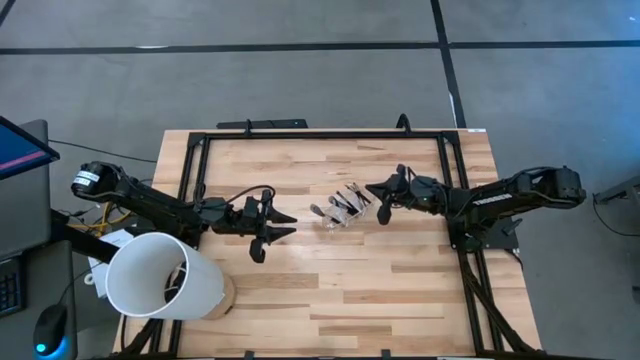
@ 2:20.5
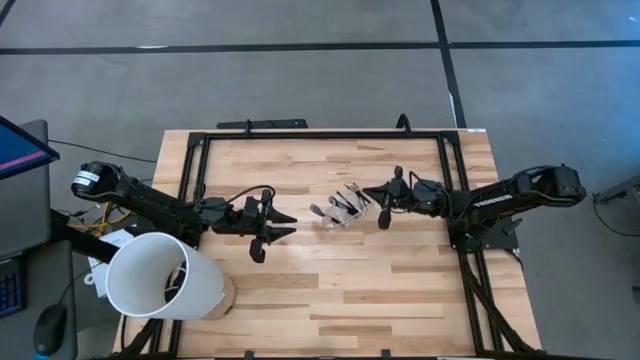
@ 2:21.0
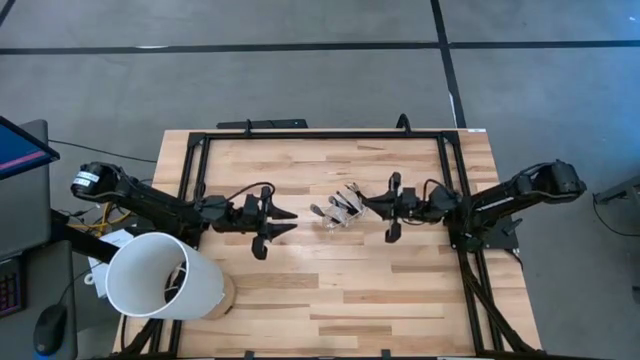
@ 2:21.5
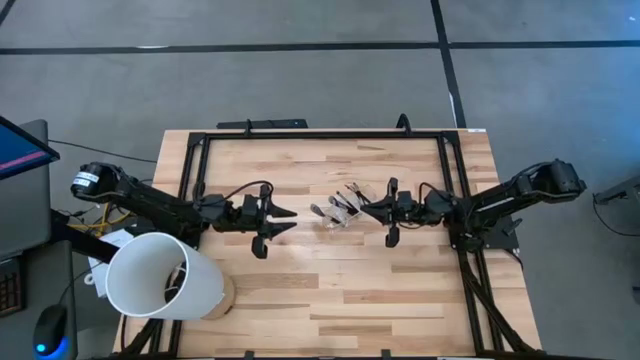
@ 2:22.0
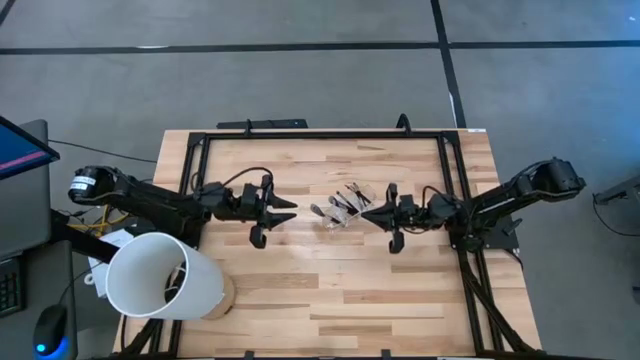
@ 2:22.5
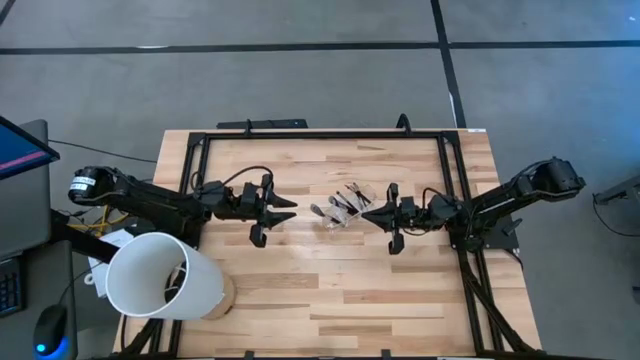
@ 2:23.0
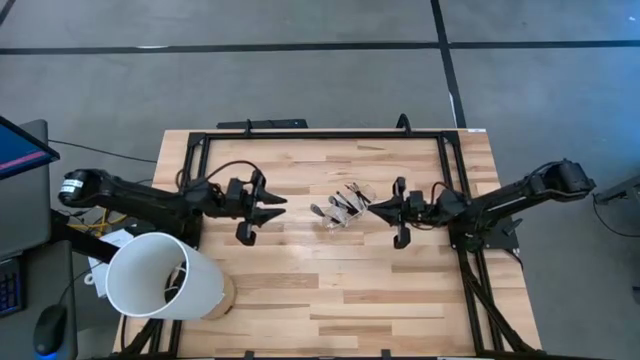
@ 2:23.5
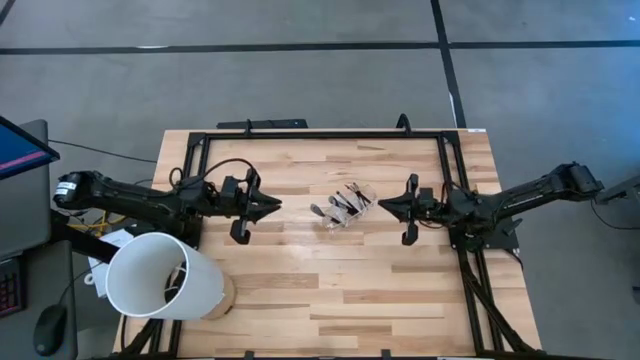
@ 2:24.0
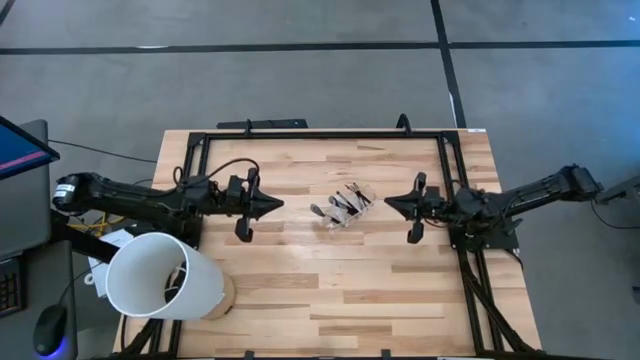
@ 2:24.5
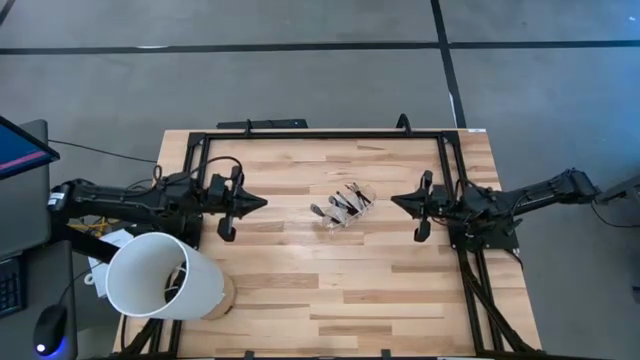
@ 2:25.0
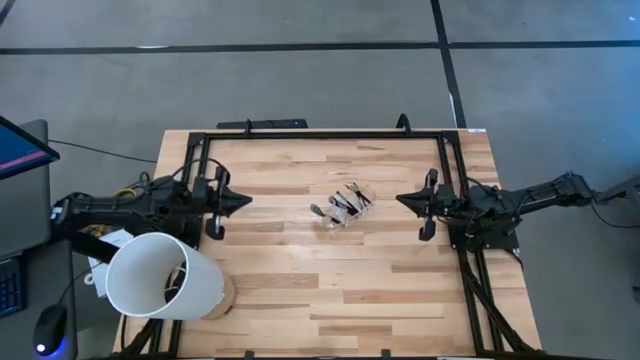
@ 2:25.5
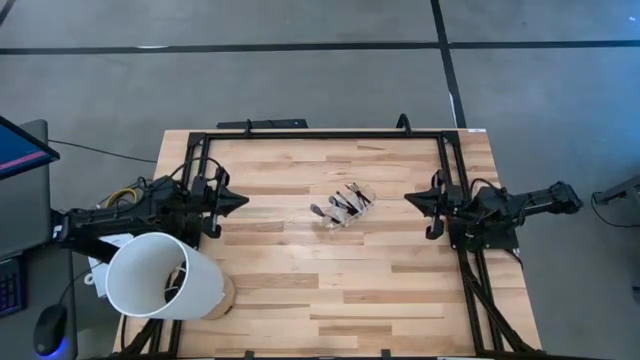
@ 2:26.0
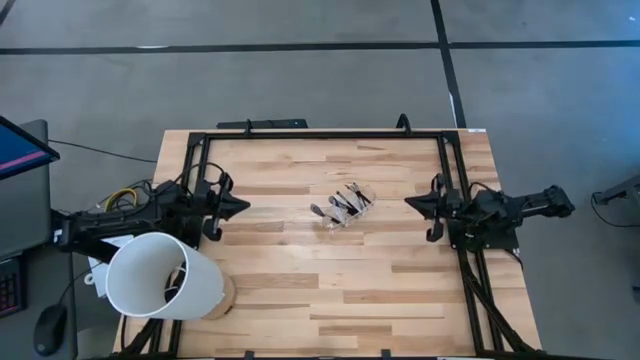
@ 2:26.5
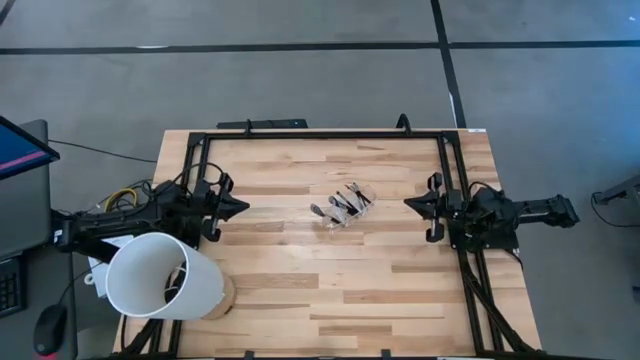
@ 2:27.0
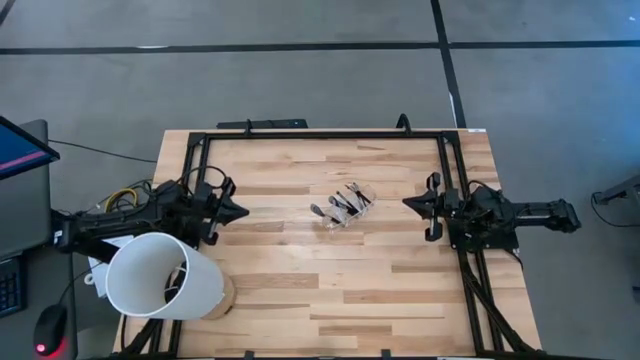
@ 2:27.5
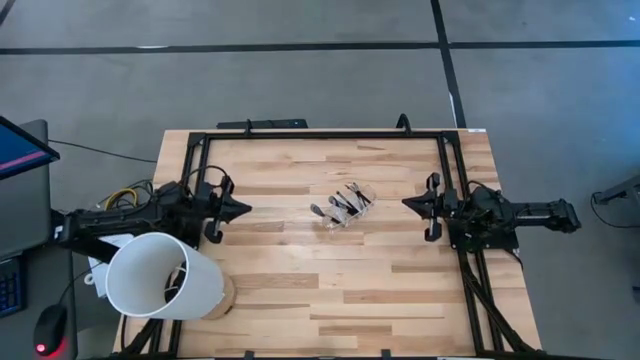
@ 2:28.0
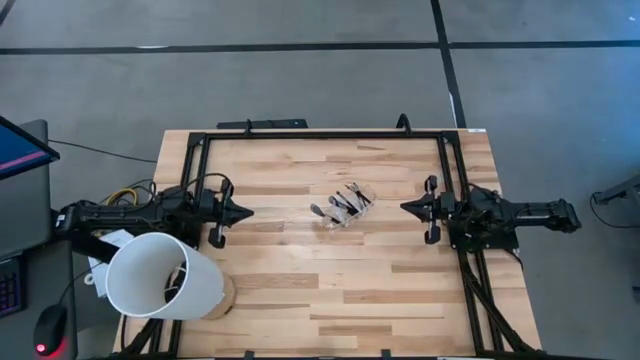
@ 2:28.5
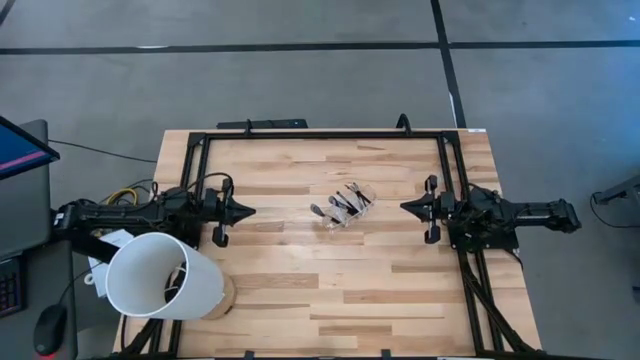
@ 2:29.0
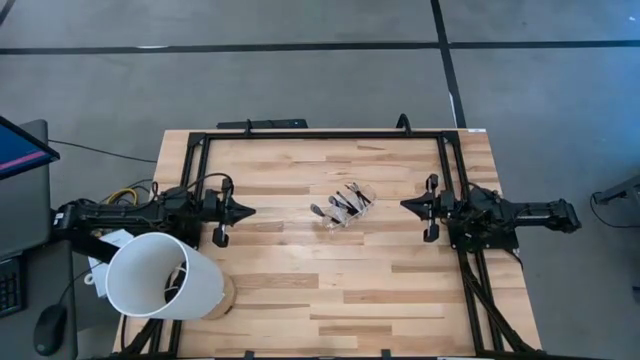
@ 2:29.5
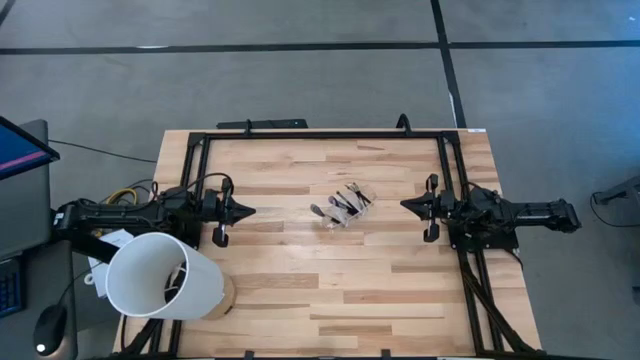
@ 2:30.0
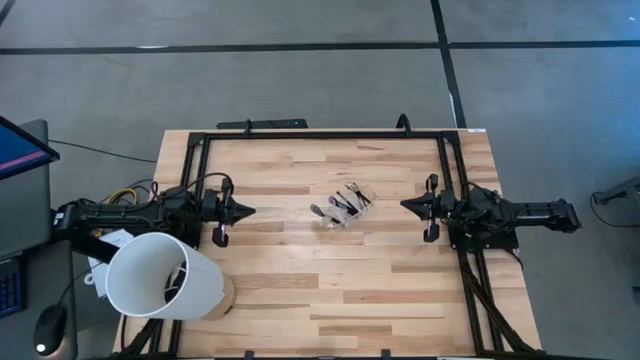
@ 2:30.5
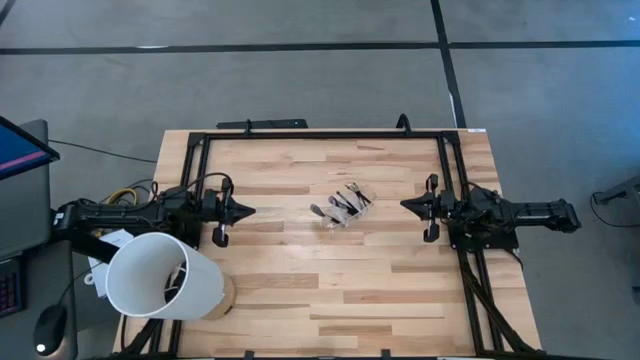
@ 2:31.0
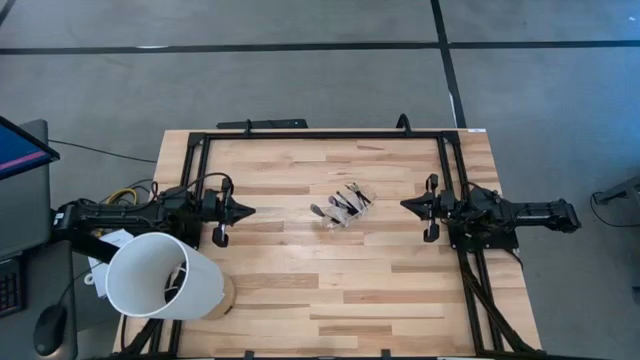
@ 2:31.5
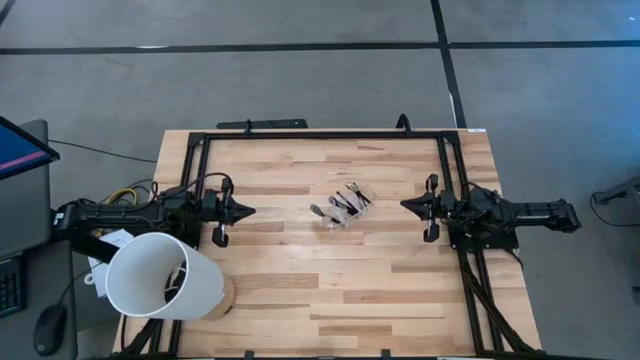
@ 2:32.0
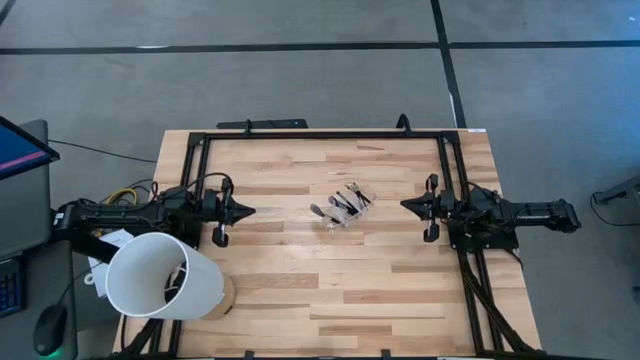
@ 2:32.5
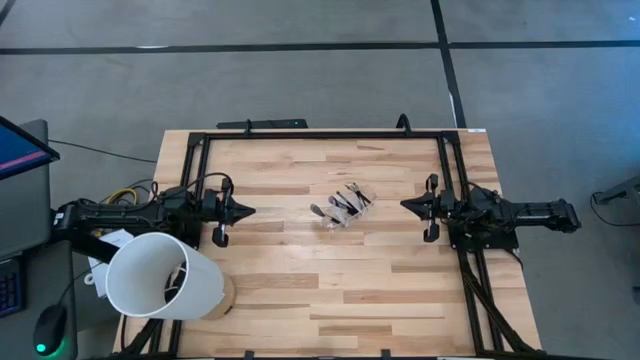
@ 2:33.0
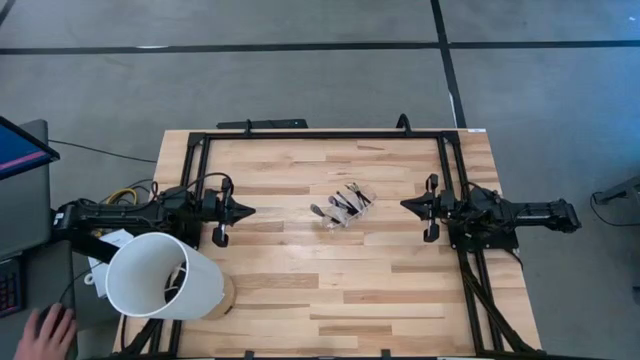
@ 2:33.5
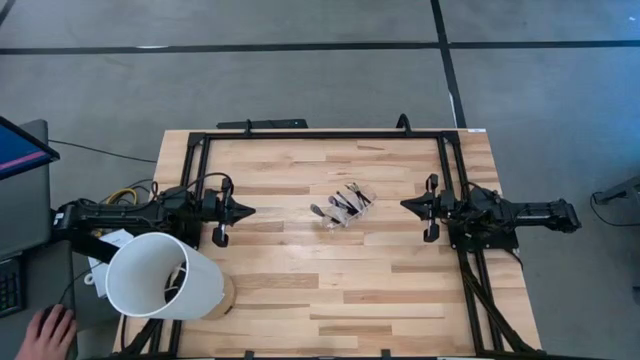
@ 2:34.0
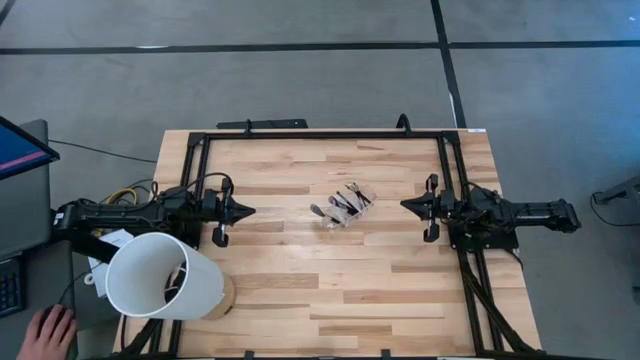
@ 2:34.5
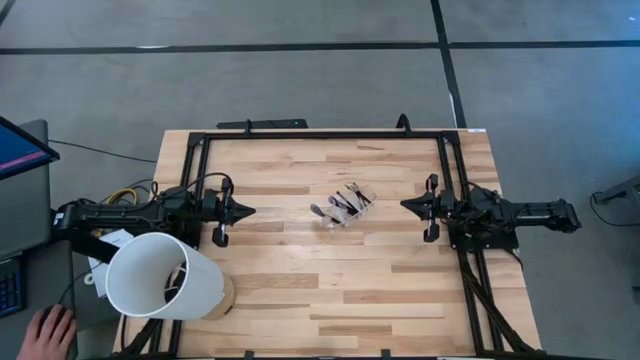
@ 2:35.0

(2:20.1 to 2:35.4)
Task: Put items in baskets/containers
Return to Home Position

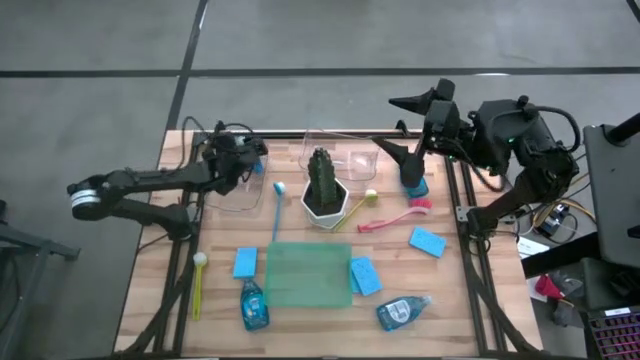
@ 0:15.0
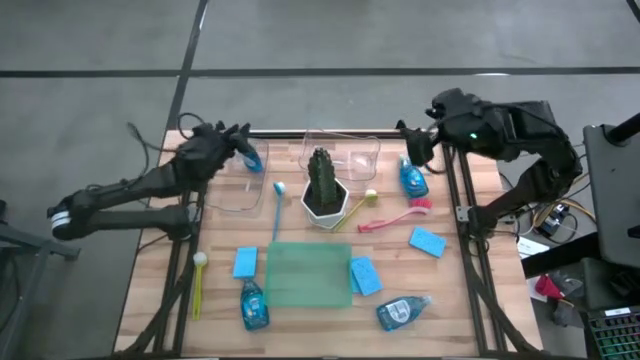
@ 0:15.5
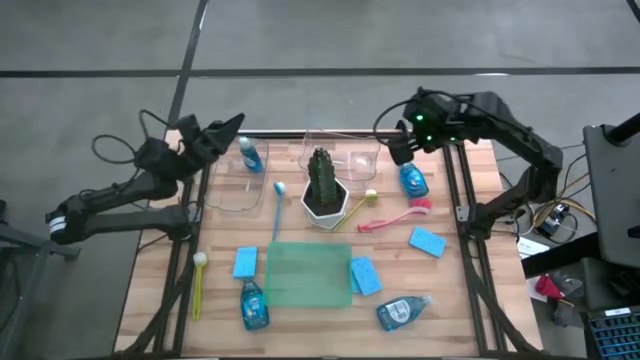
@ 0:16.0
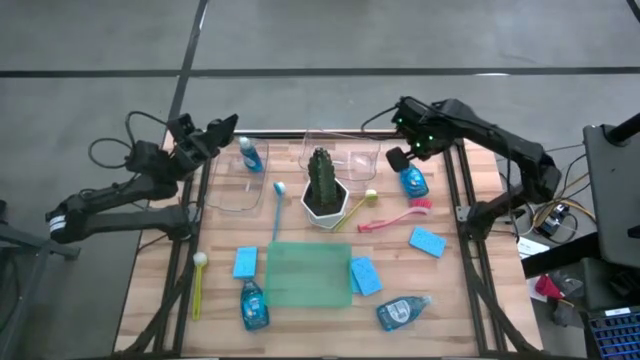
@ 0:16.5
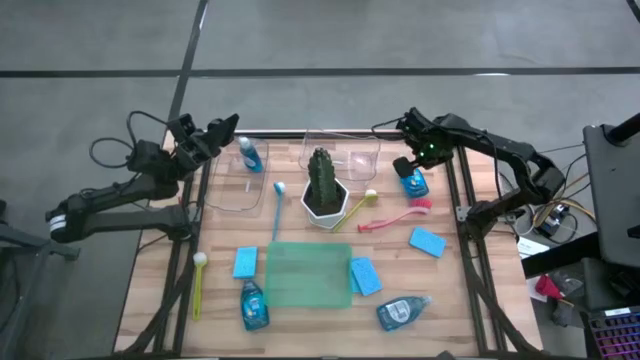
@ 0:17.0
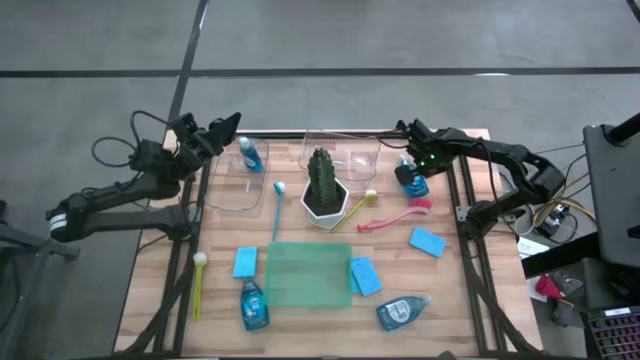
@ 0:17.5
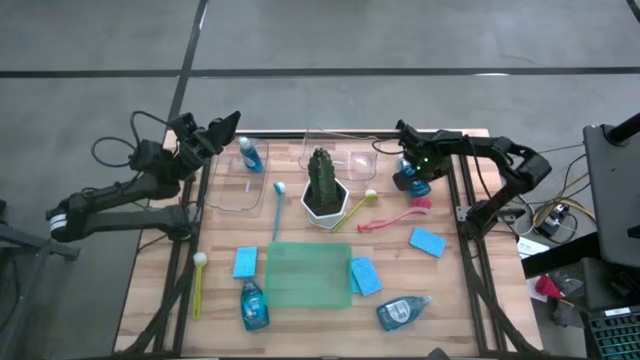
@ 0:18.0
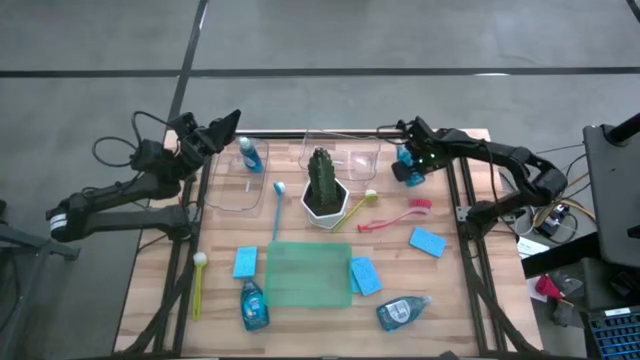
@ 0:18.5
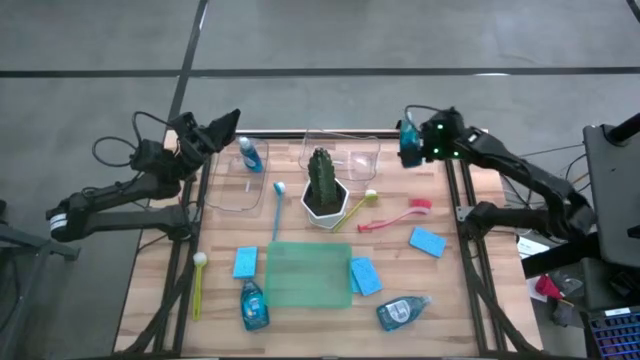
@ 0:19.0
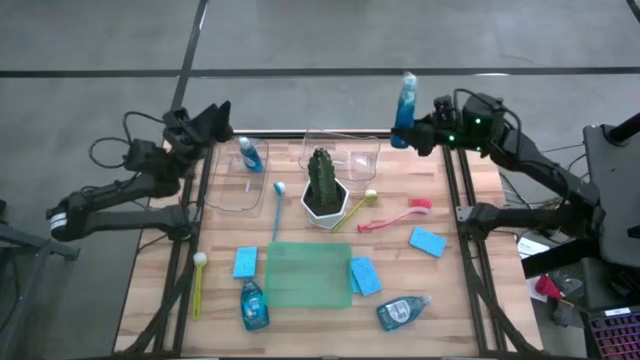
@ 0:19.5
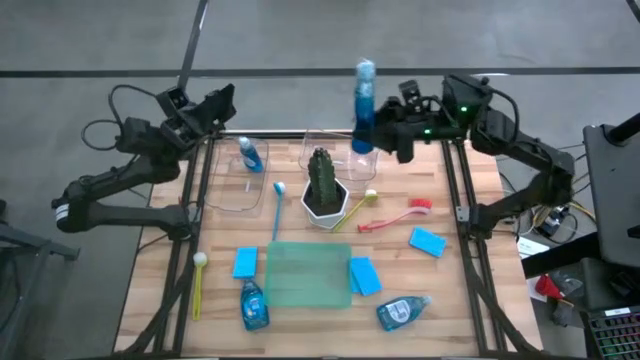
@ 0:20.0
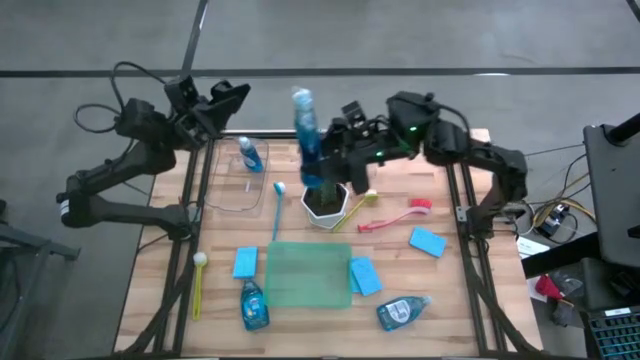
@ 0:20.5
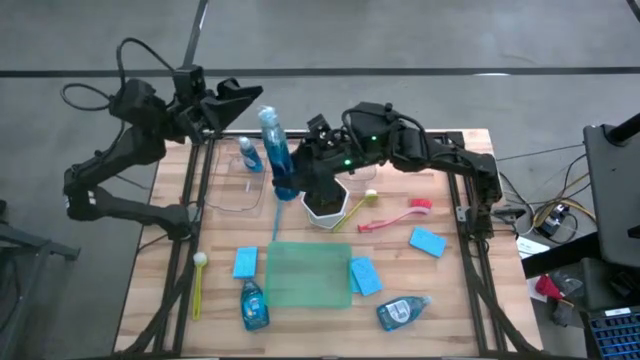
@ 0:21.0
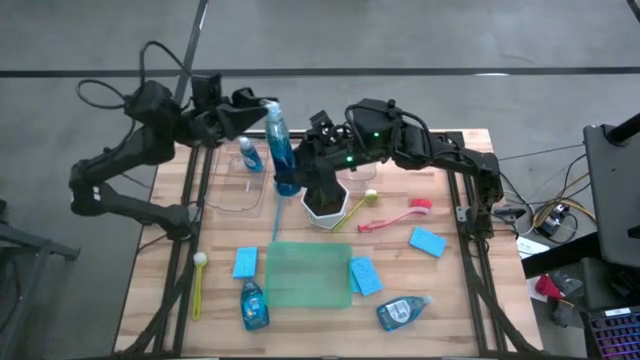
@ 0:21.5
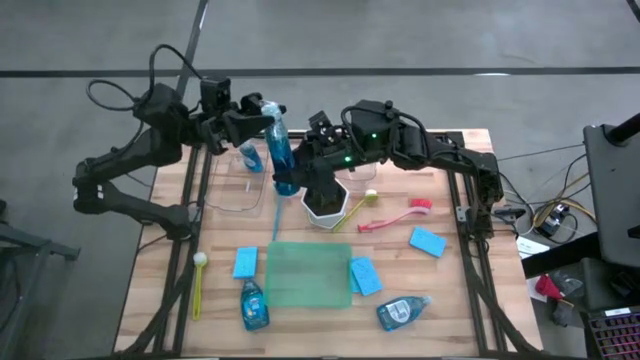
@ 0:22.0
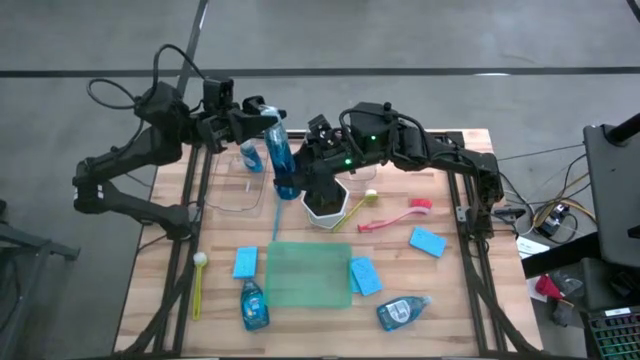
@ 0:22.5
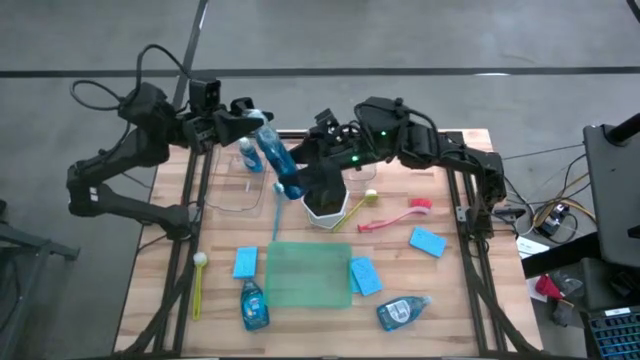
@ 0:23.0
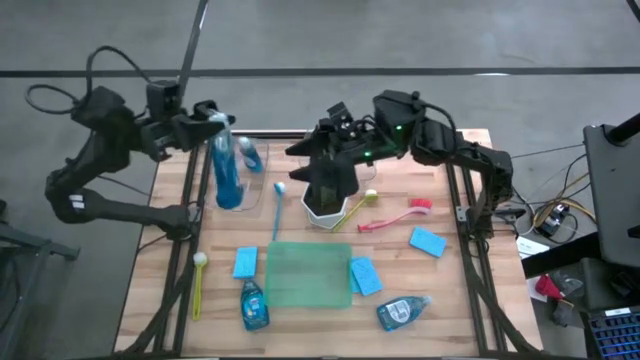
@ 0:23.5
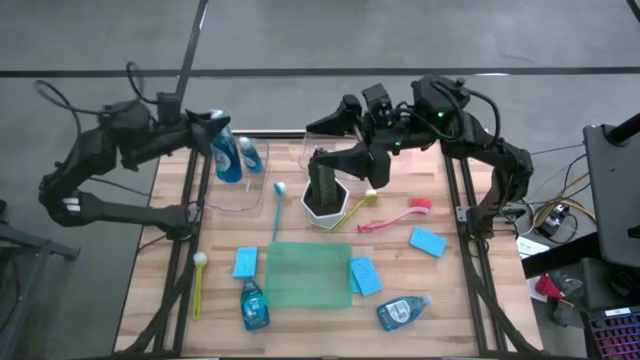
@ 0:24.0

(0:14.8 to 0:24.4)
Task: Pick & Place Kitchen Sink Supplies
Put the blue dishwashing liquid into the left transparent bin
